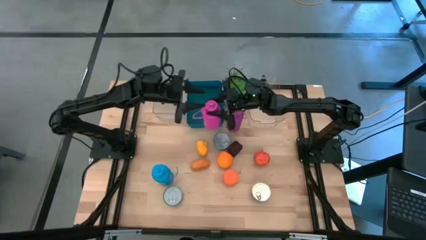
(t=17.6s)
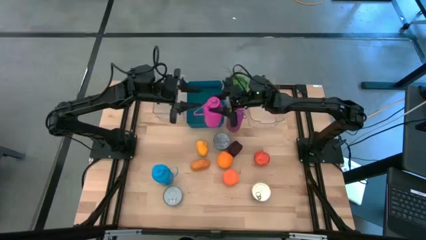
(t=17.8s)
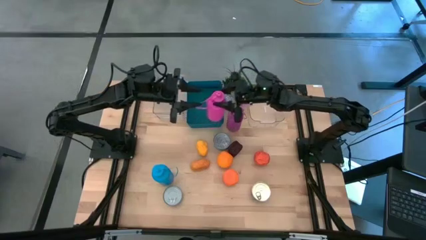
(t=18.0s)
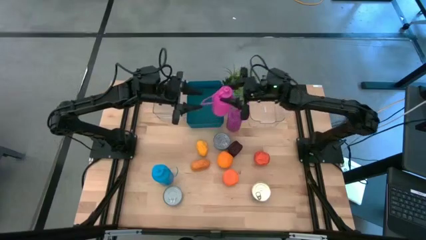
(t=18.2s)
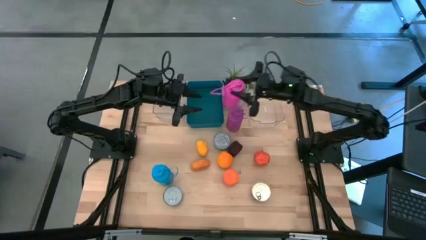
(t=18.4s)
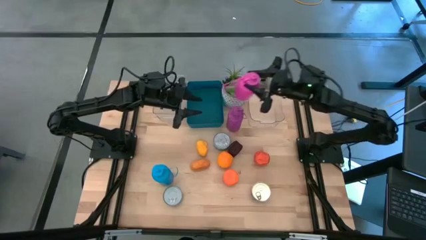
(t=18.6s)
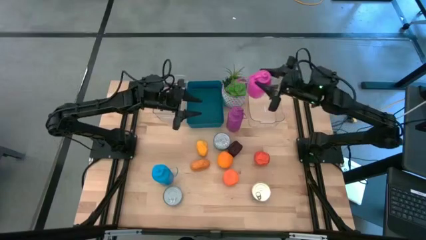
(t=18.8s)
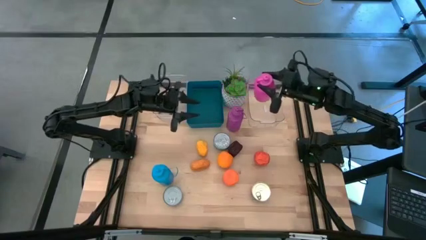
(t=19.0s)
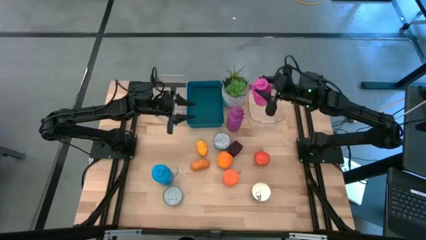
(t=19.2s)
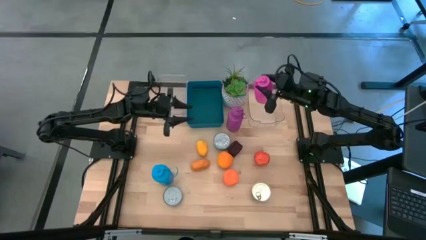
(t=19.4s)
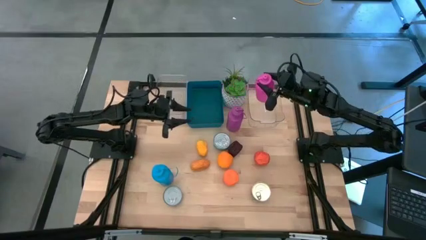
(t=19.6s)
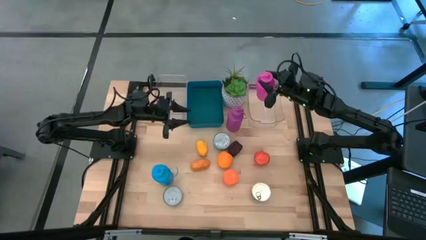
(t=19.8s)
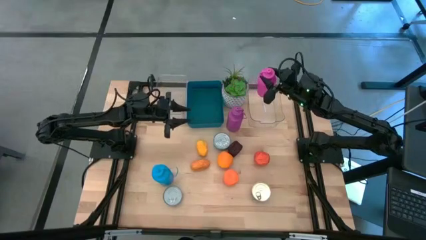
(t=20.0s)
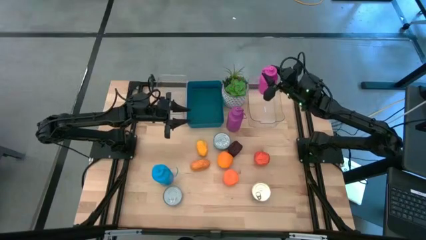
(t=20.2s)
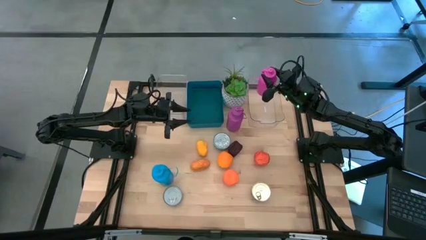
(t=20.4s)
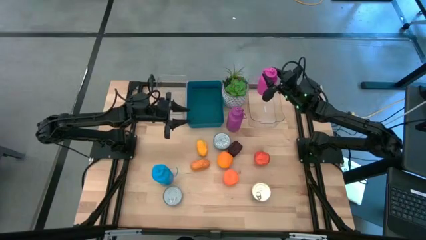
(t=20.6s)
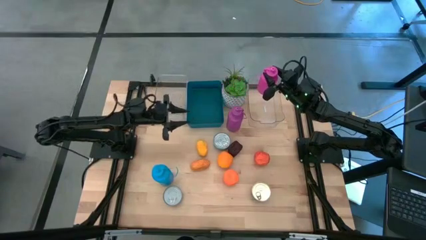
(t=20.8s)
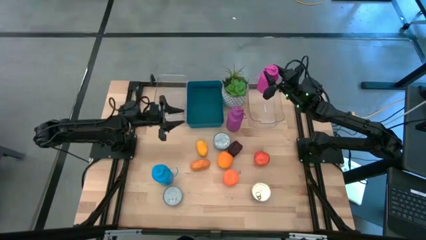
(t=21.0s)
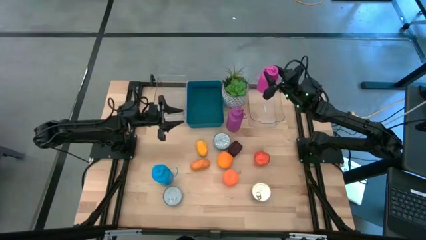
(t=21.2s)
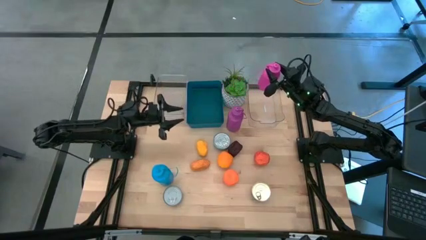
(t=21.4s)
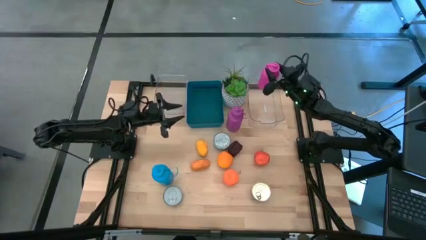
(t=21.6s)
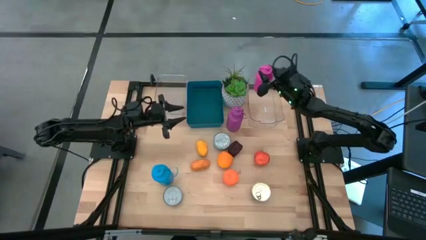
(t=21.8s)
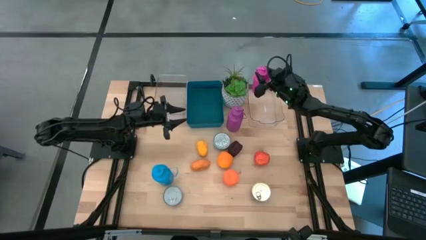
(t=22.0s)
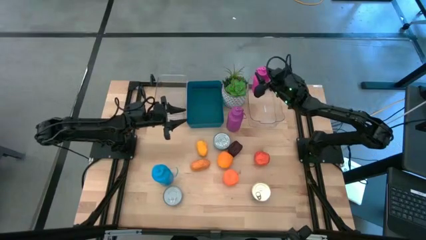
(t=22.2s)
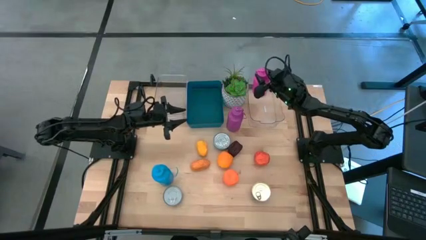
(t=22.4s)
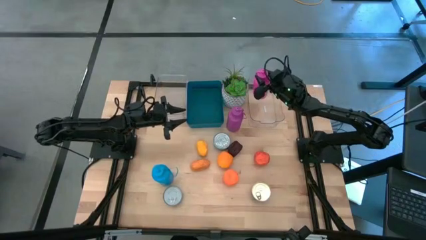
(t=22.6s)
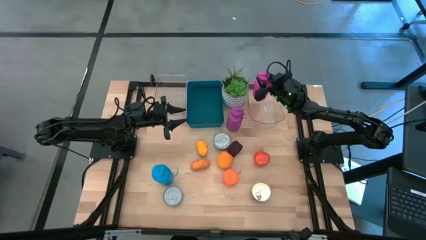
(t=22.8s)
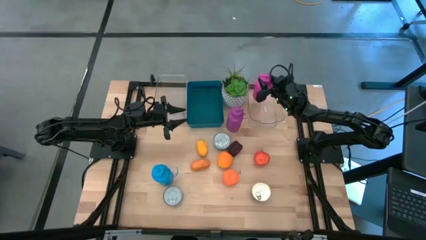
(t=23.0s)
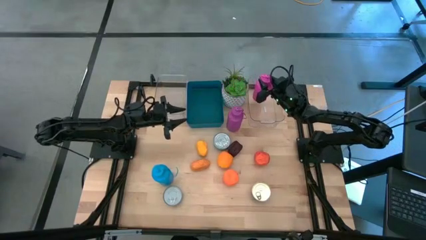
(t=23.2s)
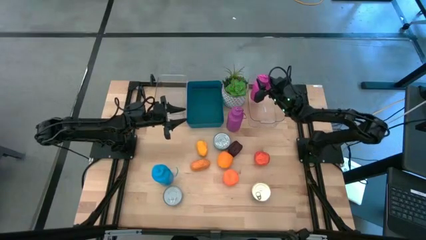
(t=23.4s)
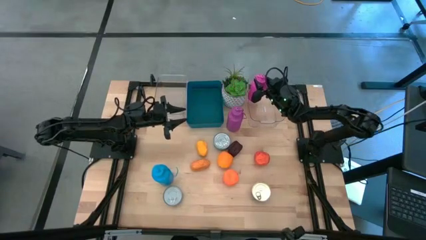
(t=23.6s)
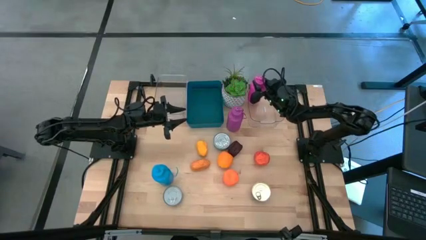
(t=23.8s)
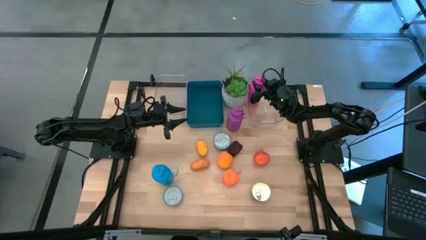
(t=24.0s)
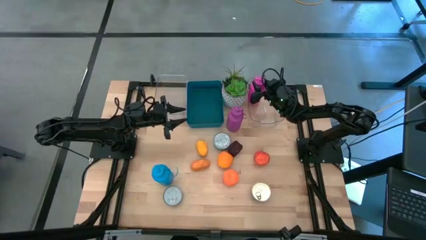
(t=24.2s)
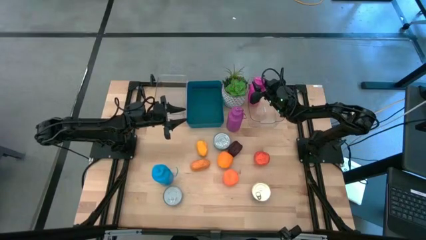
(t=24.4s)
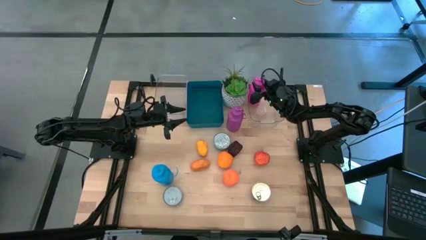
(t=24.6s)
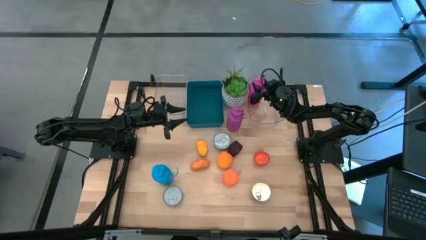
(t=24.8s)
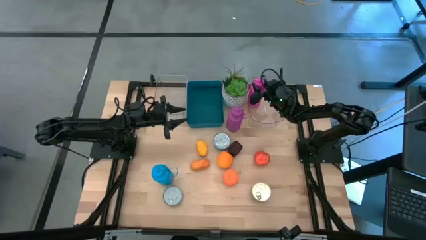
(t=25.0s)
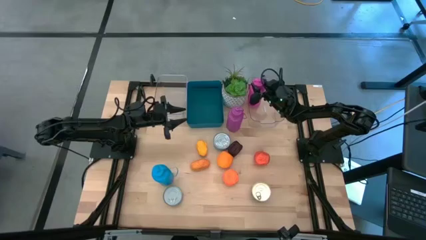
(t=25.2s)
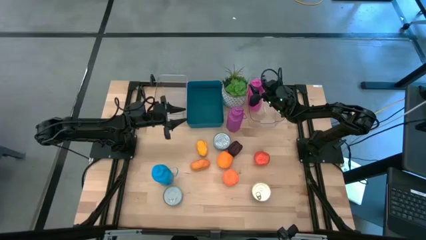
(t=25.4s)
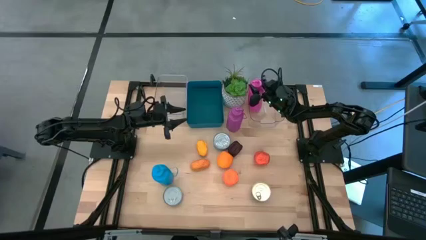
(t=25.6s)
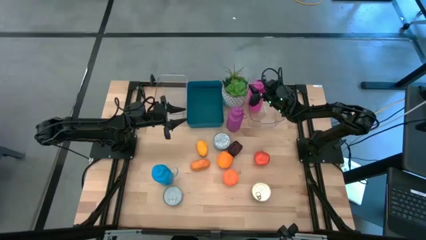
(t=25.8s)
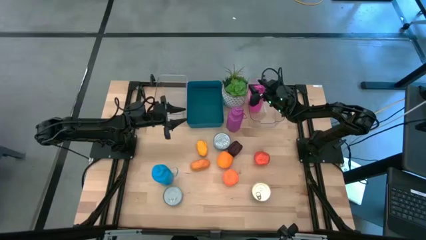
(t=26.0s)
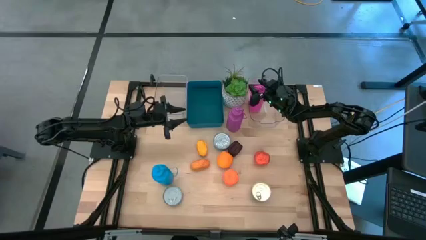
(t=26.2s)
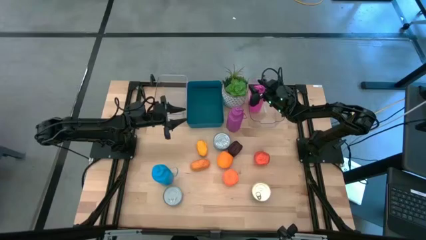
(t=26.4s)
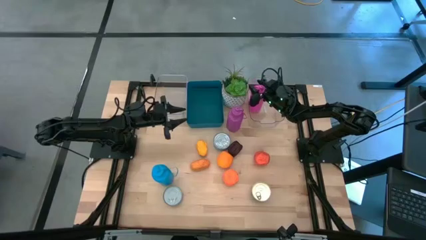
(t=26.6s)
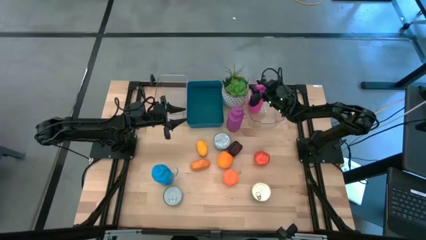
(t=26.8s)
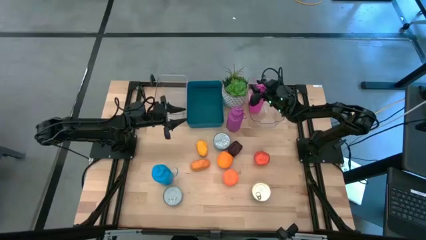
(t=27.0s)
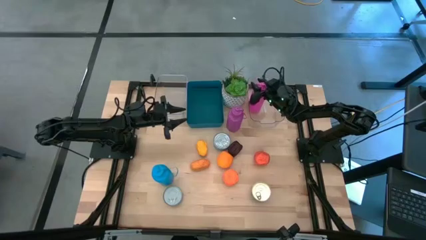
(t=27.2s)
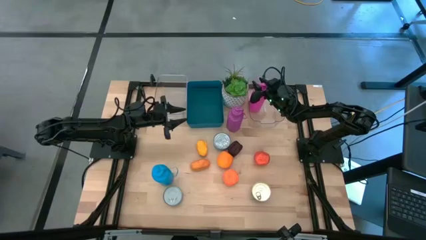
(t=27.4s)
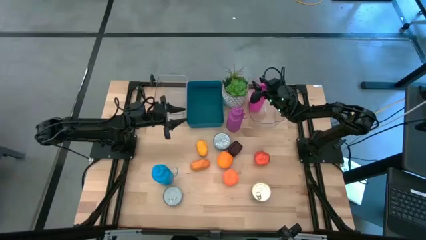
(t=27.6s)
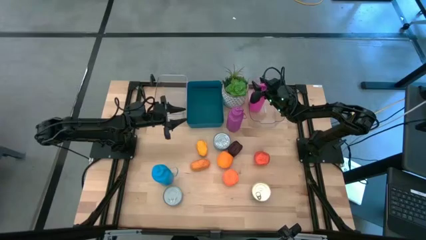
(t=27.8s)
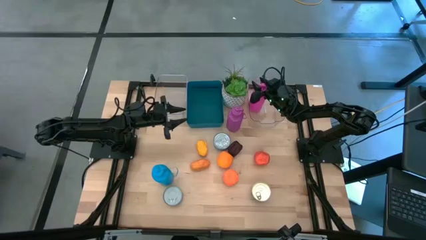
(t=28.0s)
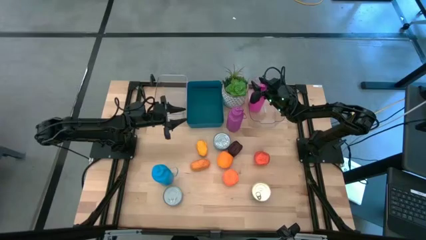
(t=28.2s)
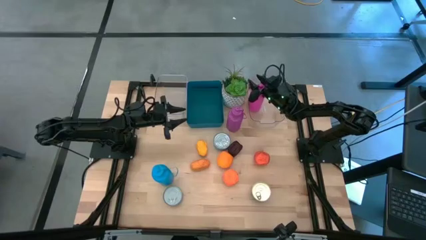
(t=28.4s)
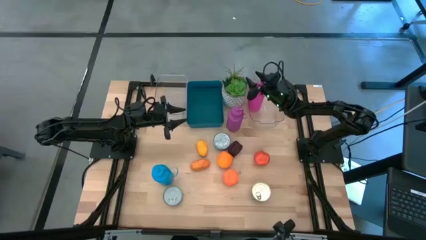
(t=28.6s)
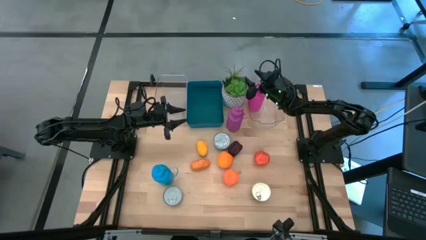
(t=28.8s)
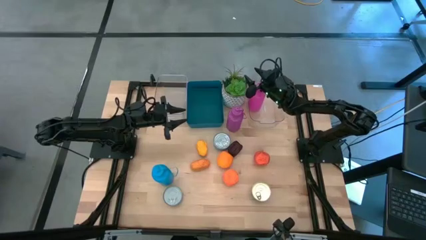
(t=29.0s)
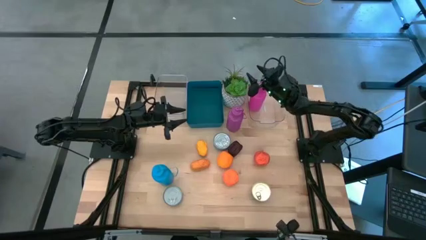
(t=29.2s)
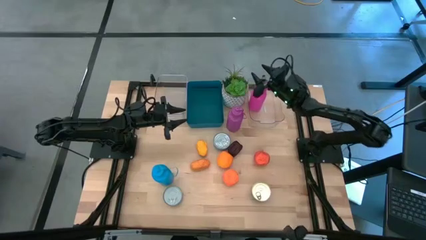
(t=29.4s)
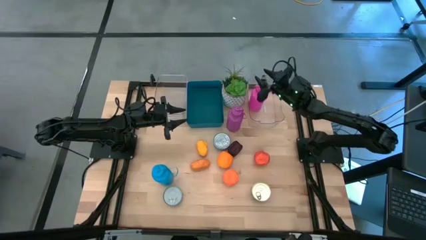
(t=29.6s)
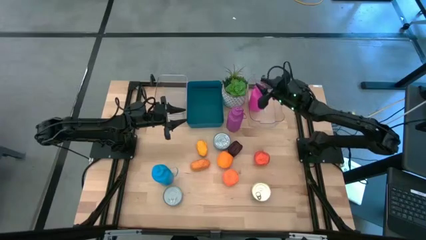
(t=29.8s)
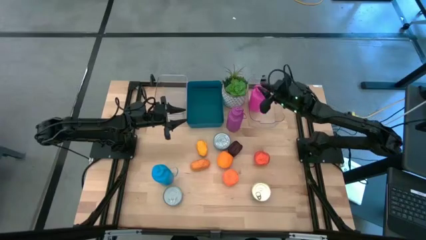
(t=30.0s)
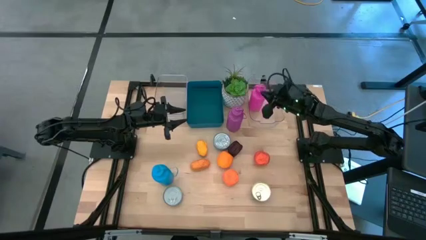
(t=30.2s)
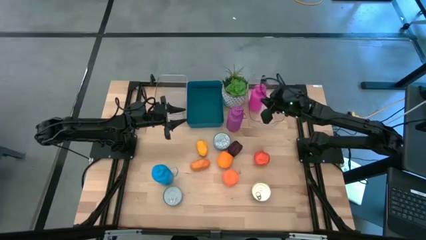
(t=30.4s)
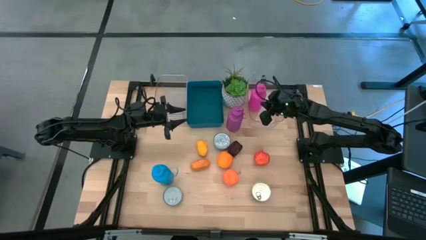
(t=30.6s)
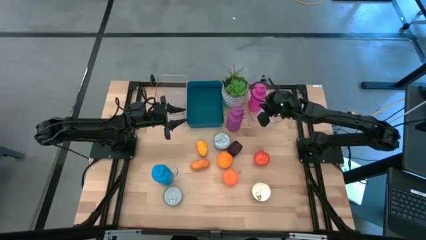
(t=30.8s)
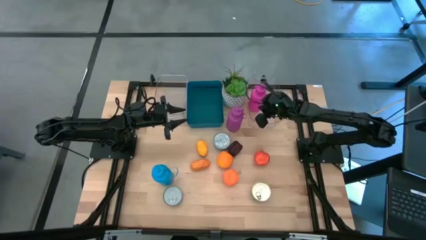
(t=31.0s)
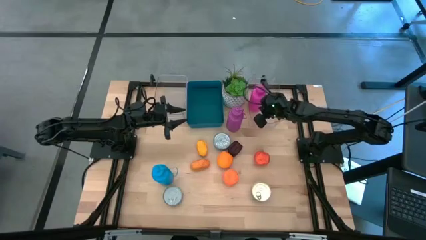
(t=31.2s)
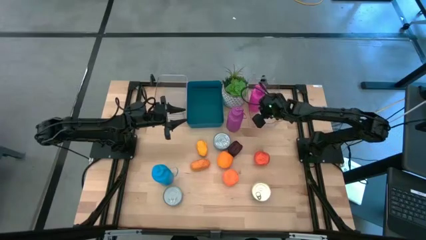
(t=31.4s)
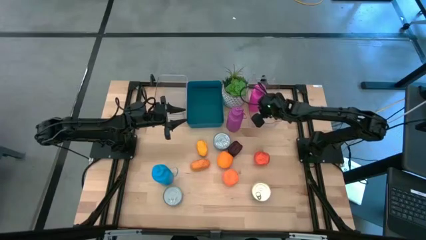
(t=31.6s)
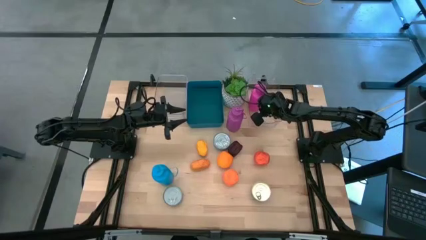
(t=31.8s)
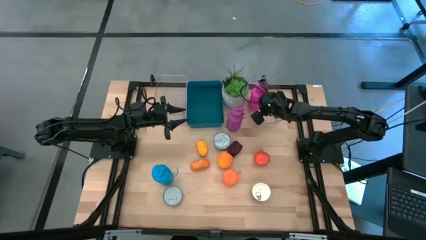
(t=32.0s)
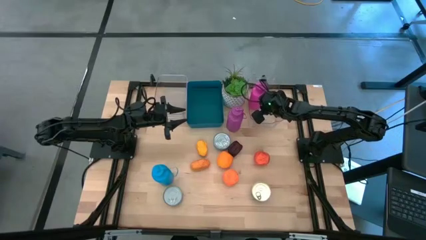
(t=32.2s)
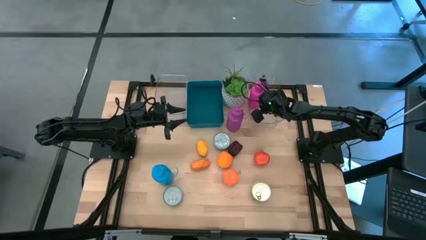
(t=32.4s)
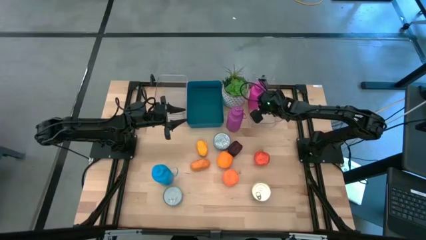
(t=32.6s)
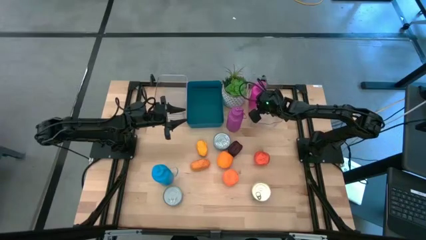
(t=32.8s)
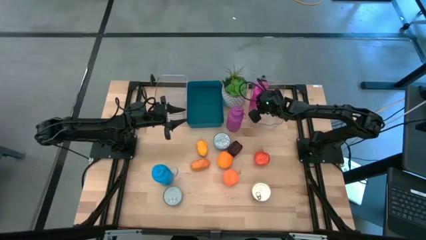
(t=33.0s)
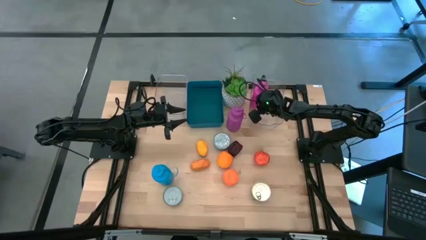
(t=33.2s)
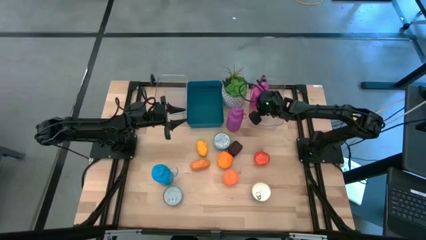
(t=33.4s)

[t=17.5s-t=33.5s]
Task: Pick & Place Food Item
Put the pink tumbler into the right transparent bin
